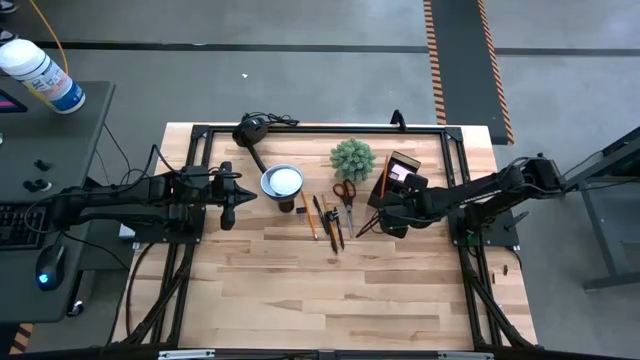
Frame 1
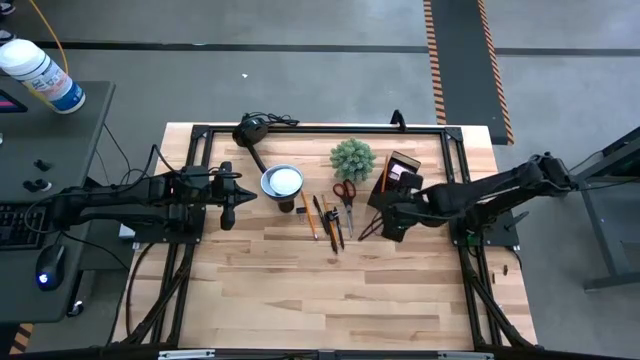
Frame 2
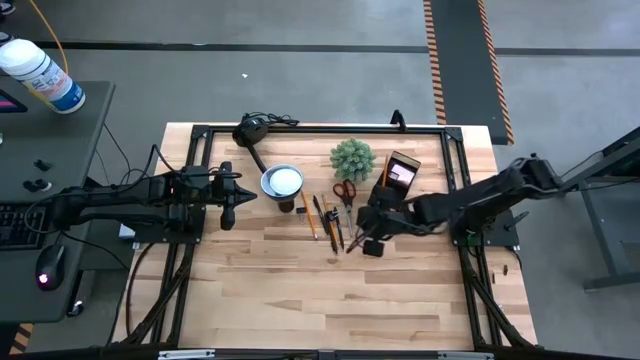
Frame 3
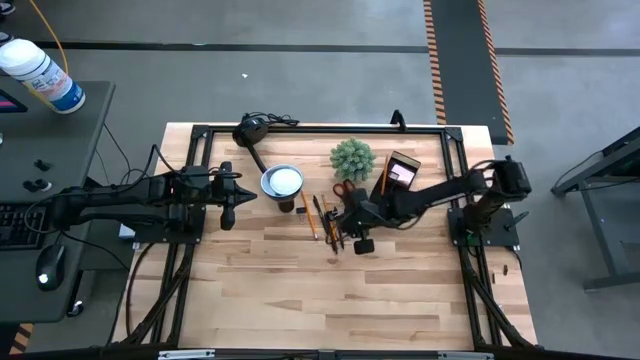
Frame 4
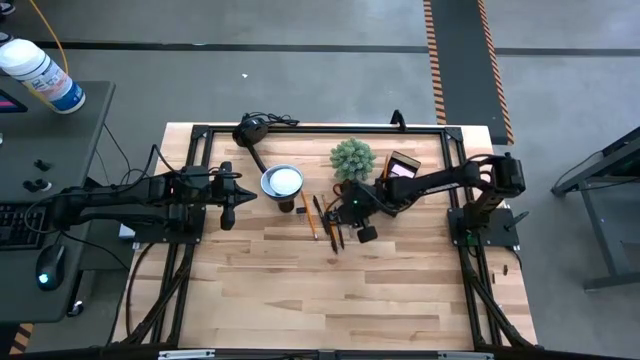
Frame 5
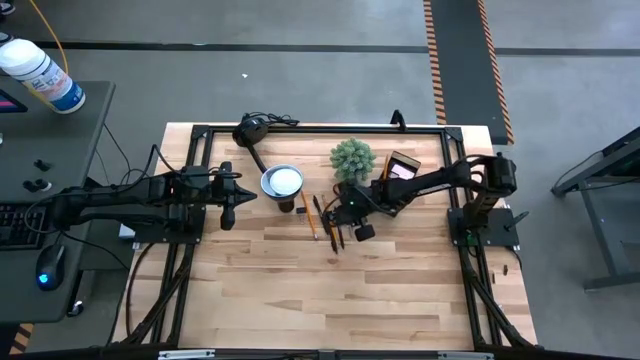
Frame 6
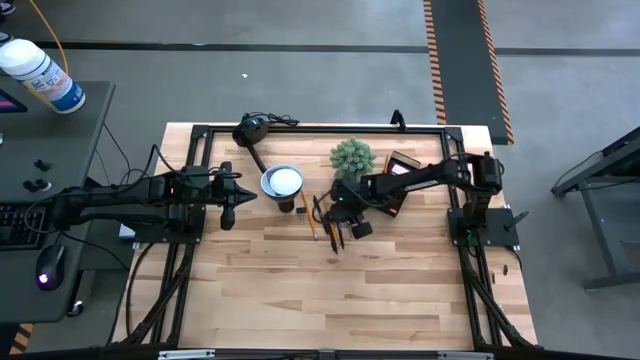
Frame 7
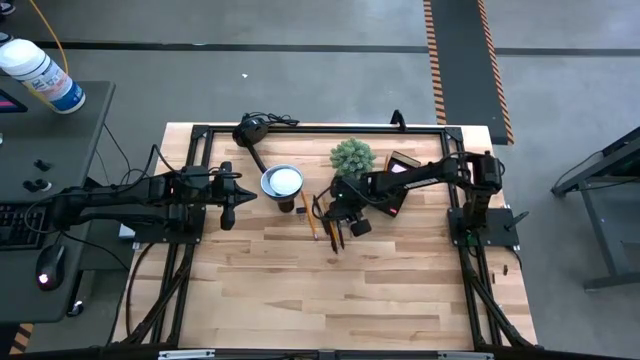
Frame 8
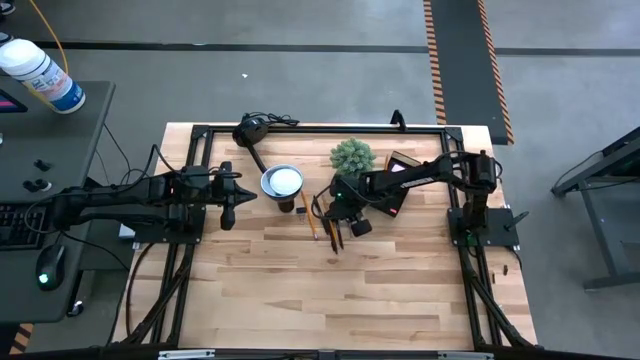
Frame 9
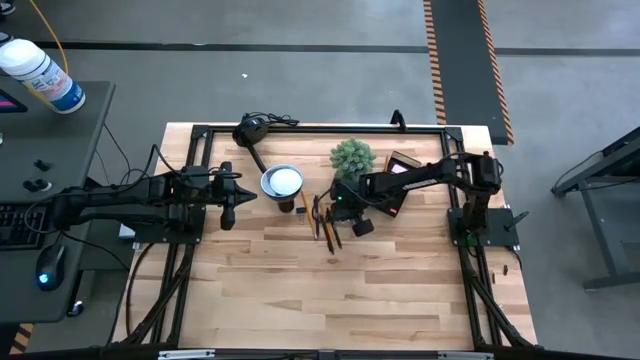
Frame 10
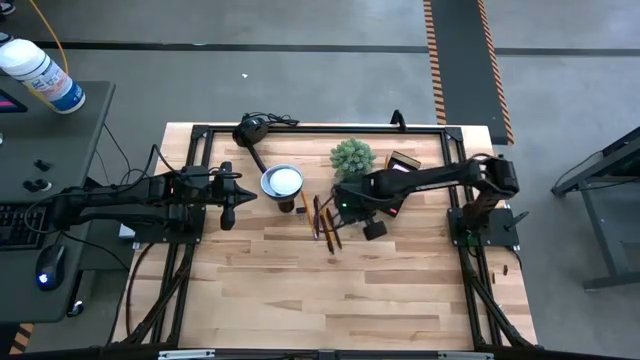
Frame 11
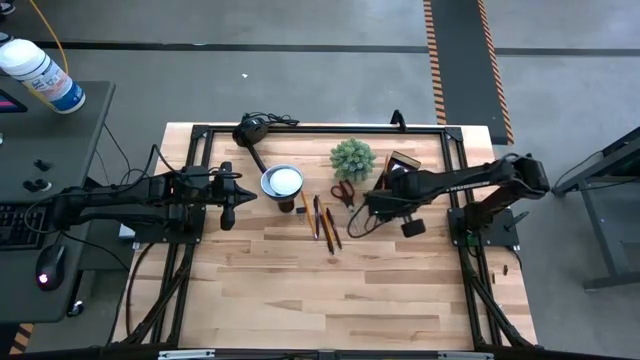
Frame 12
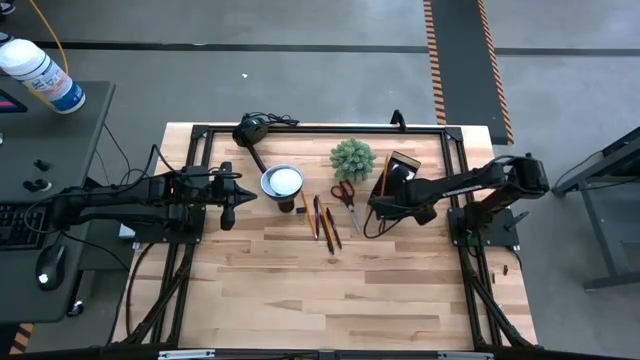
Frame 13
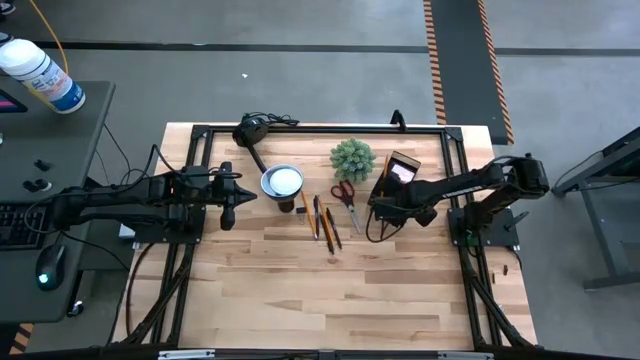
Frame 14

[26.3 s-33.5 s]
Task: Pick and place office supplies into organizer
Put the right black binder clip into the desk organizer

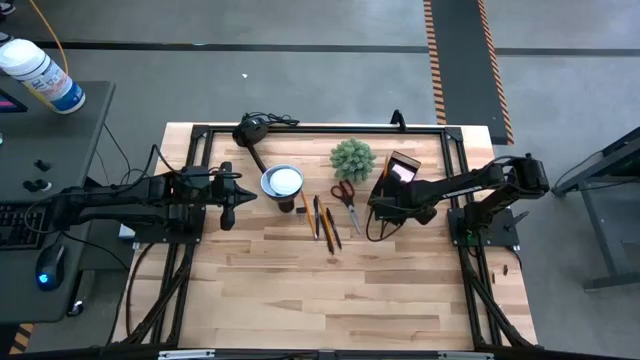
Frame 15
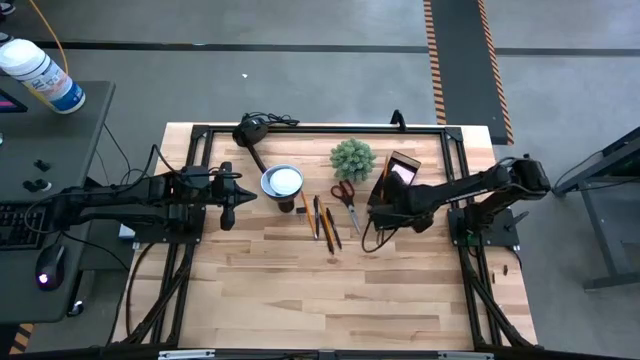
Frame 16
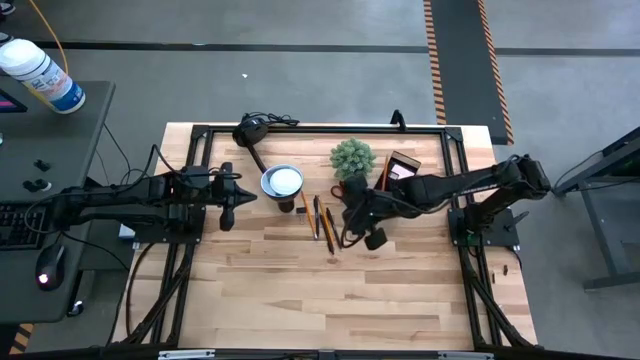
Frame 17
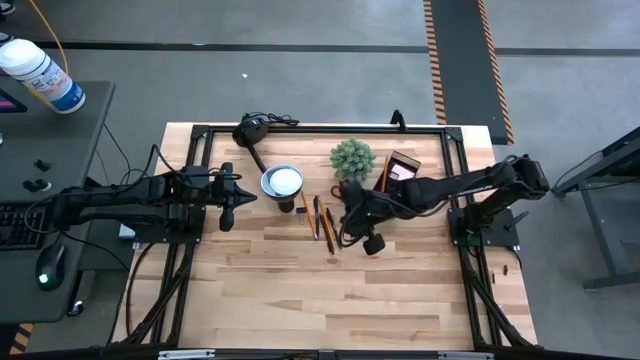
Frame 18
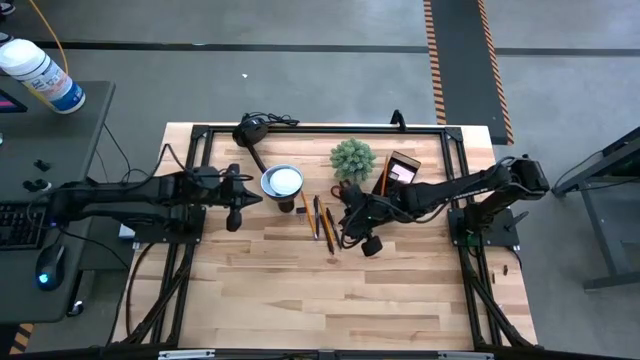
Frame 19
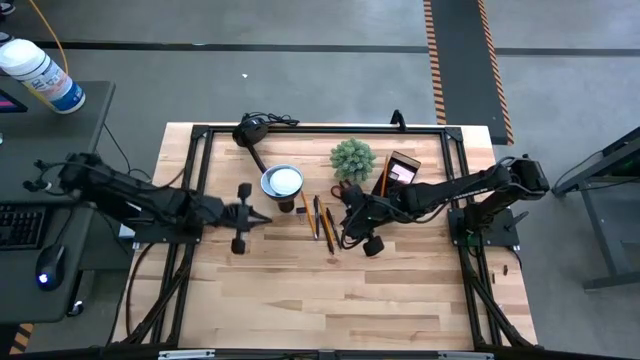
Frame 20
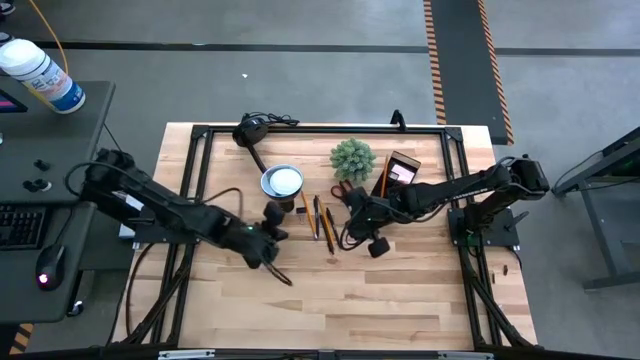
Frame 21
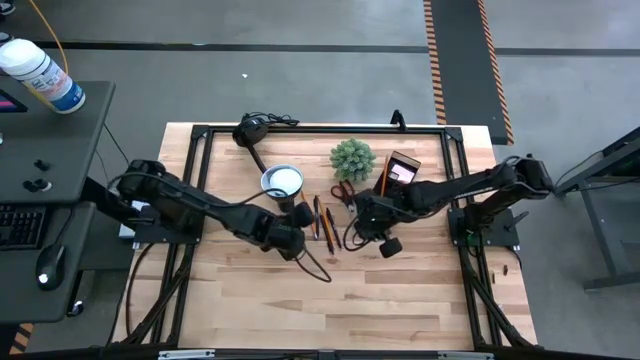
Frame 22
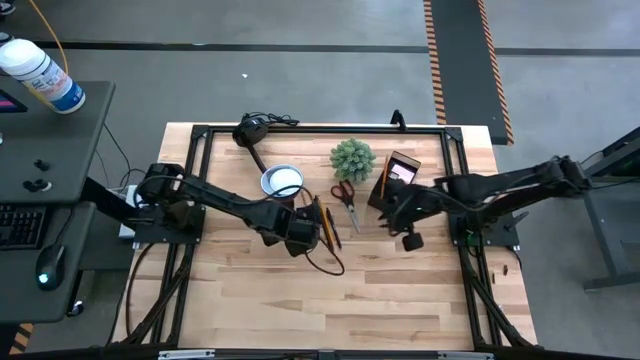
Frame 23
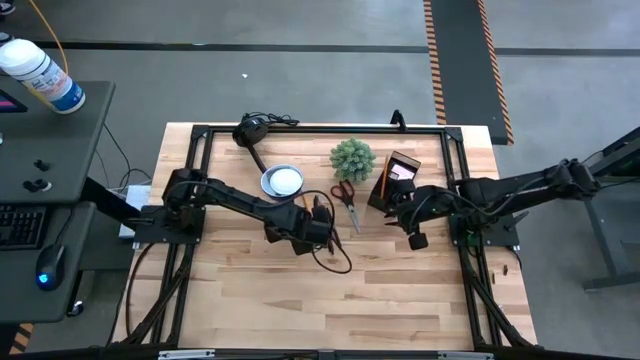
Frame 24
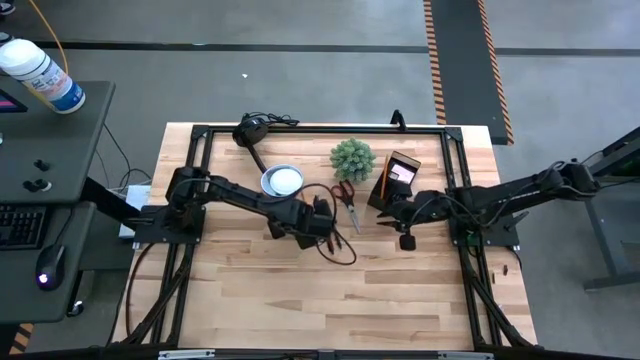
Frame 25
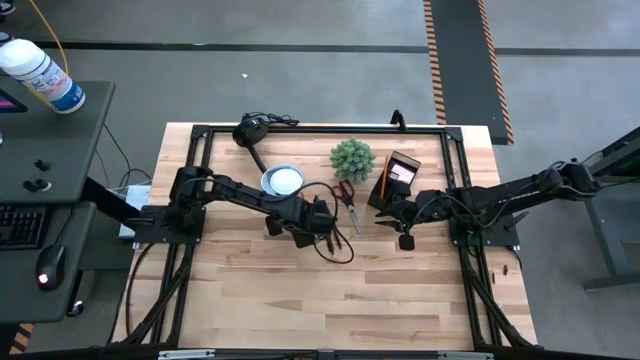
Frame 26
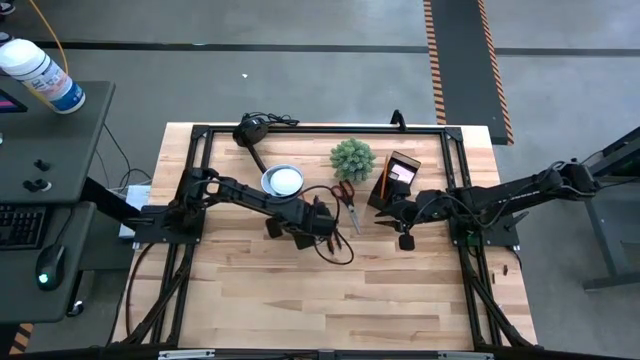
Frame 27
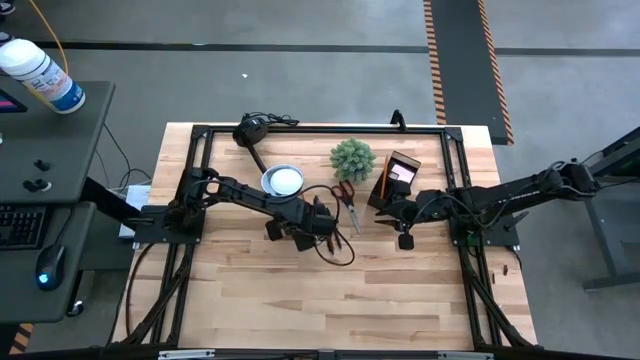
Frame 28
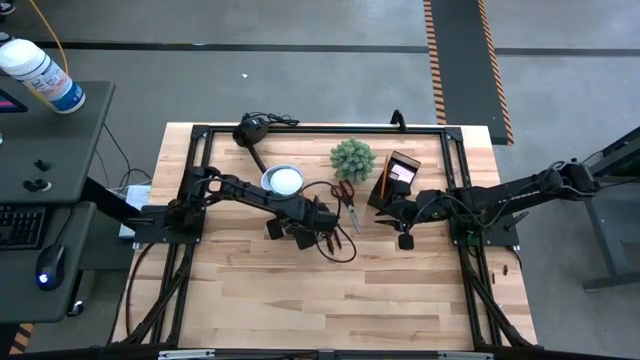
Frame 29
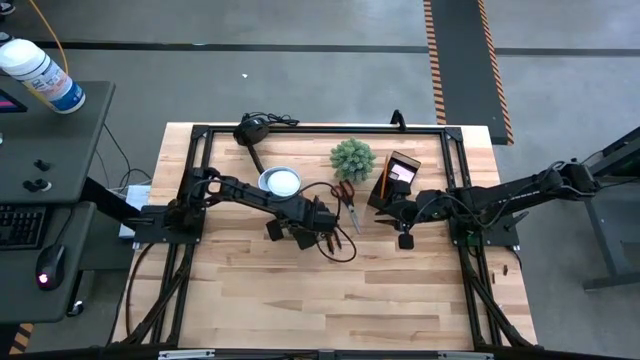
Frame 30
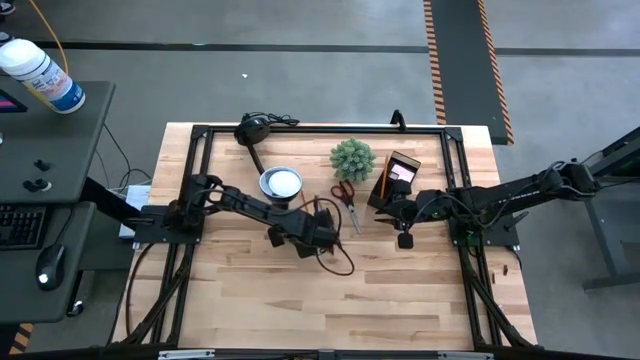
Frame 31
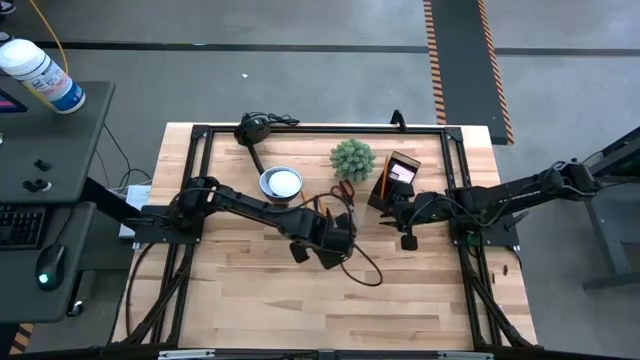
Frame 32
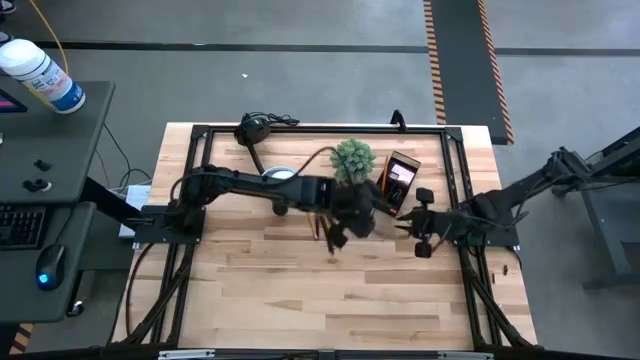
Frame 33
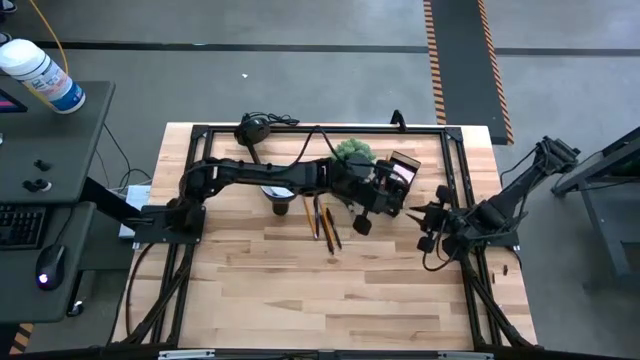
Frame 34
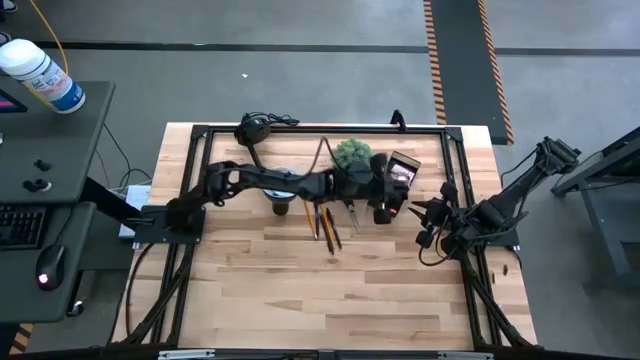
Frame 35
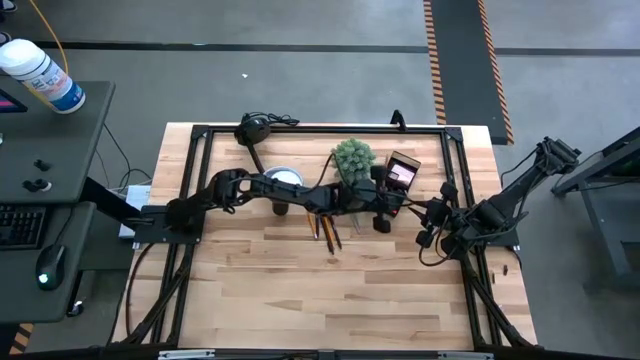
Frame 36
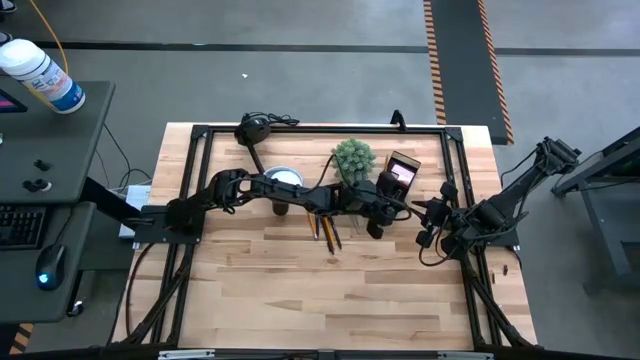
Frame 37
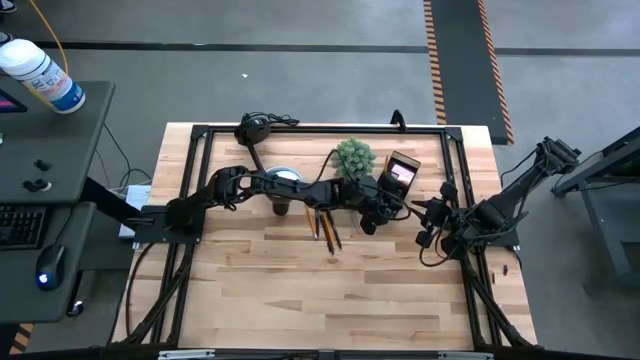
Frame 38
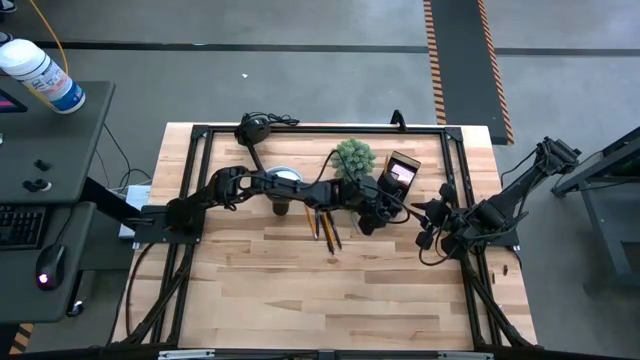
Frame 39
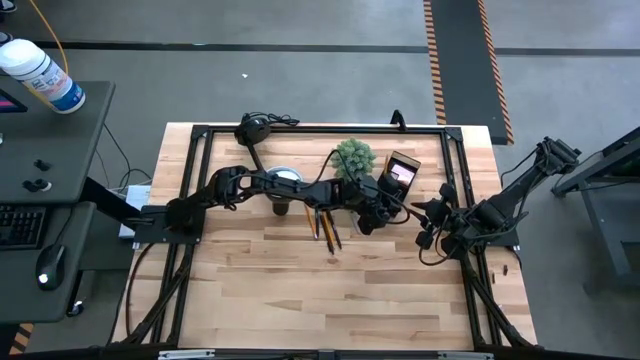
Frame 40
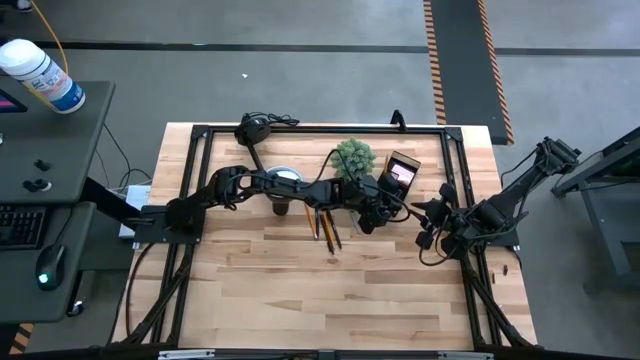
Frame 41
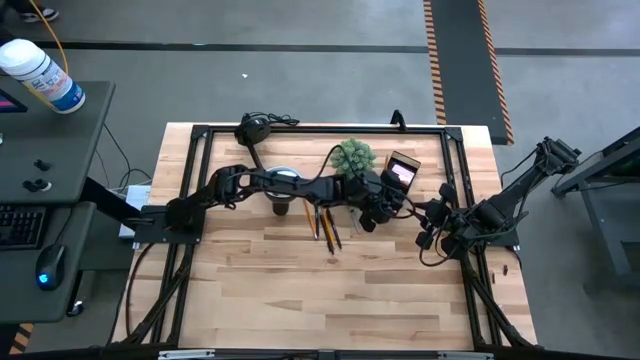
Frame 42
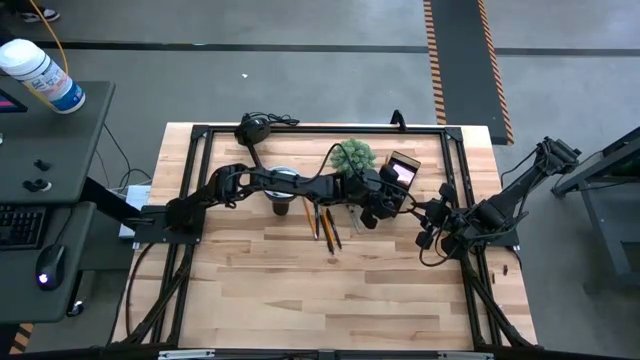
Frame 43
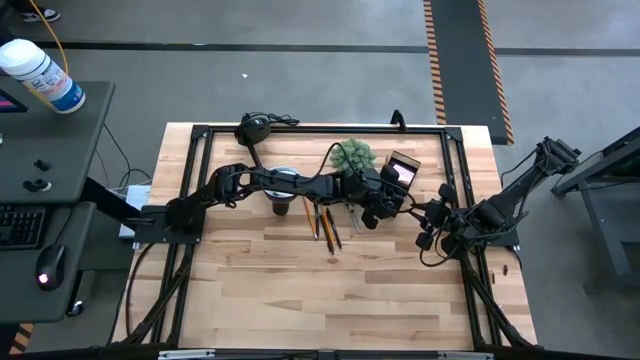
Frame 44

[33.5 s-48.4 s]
Put the black binder clip into the desk organizer

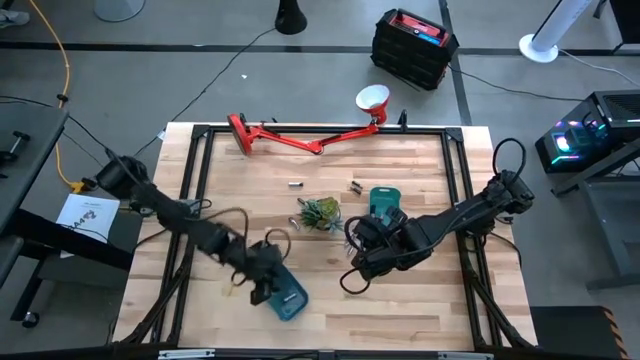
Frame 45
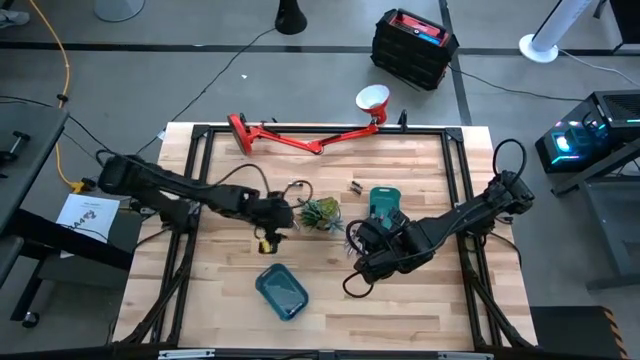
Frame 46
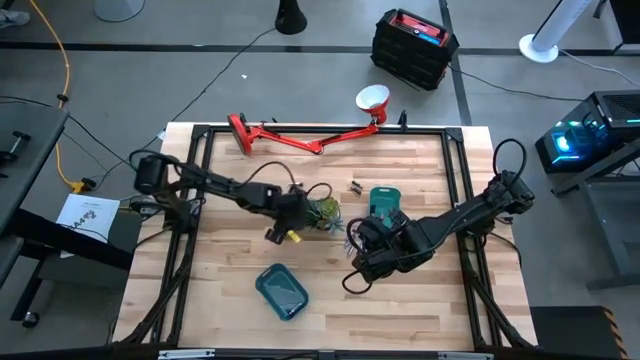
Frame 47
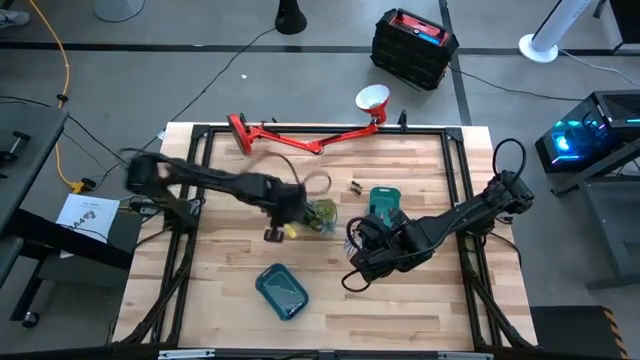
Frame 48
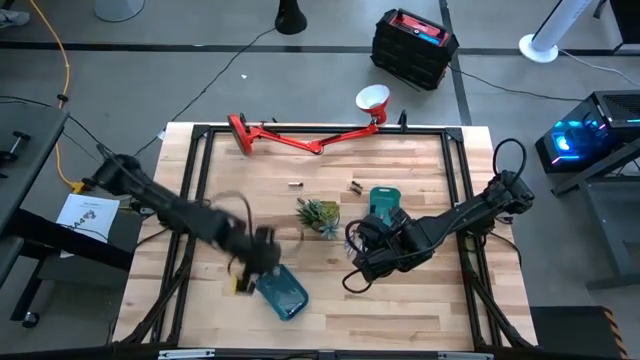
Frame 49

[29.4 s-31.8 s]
Task: Sort batteries
Put the silver battery into the blue bin
